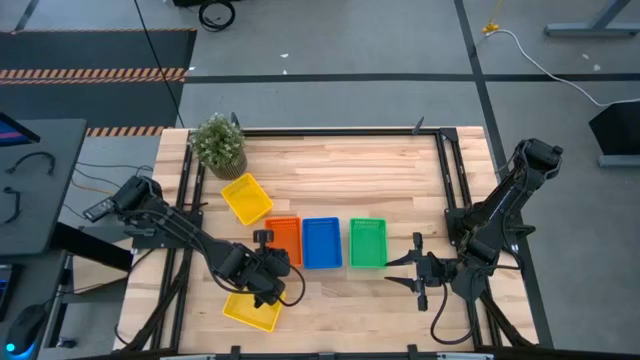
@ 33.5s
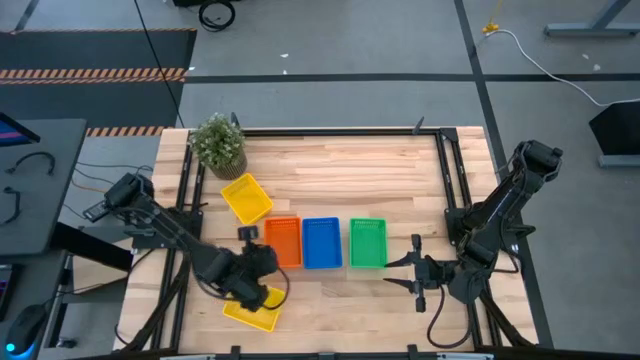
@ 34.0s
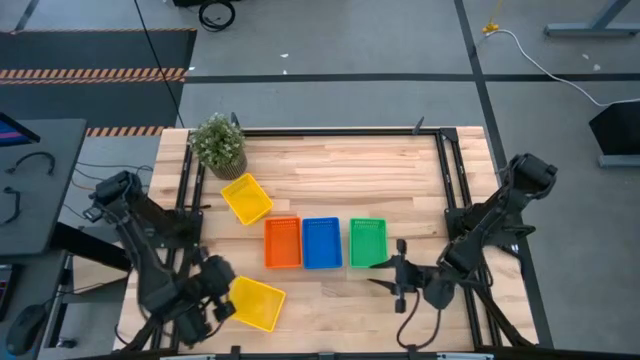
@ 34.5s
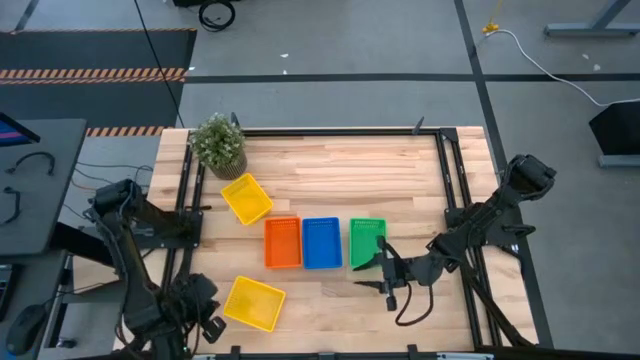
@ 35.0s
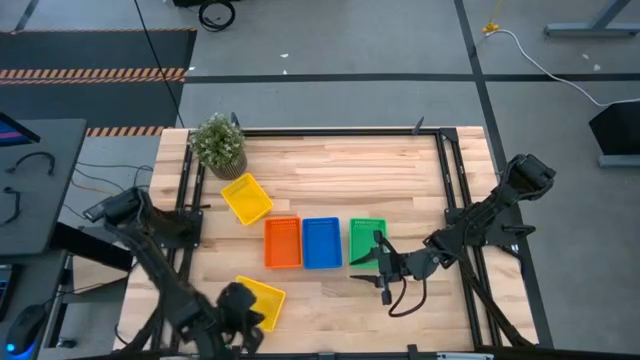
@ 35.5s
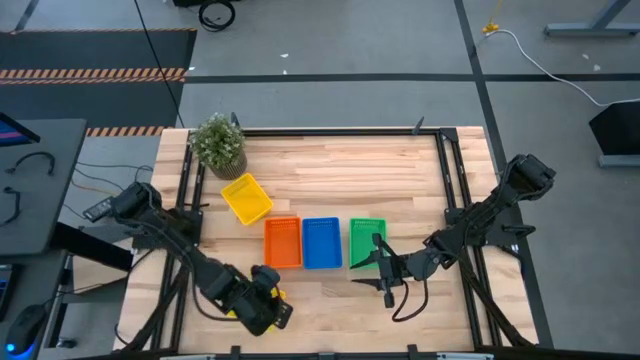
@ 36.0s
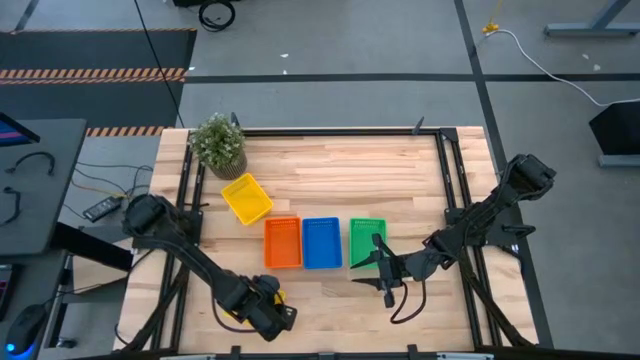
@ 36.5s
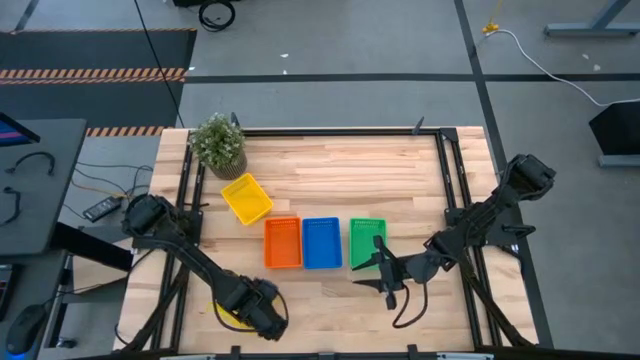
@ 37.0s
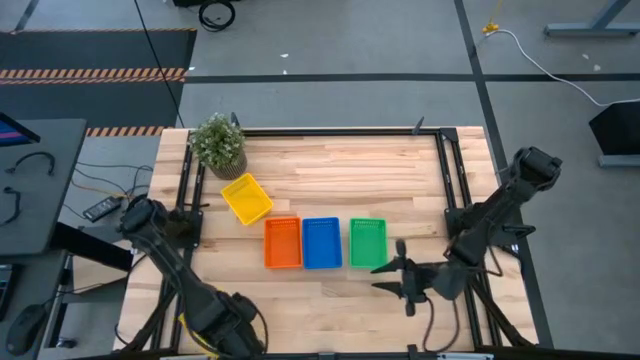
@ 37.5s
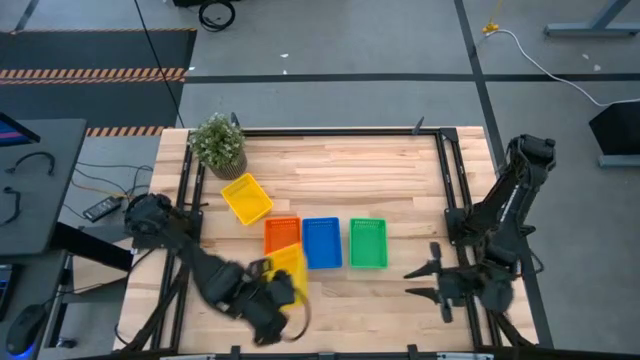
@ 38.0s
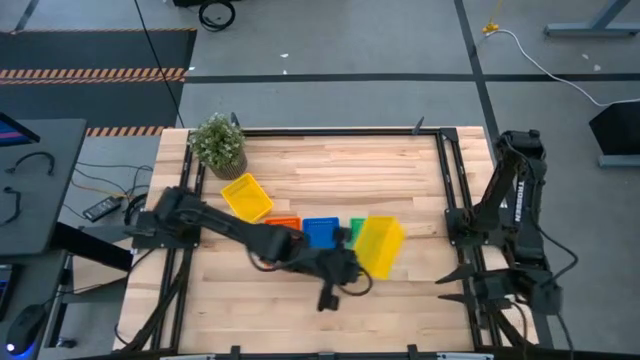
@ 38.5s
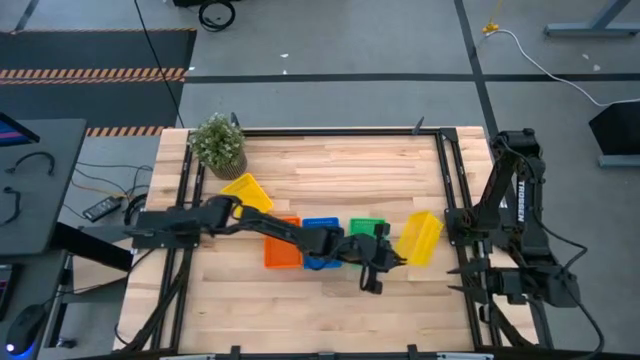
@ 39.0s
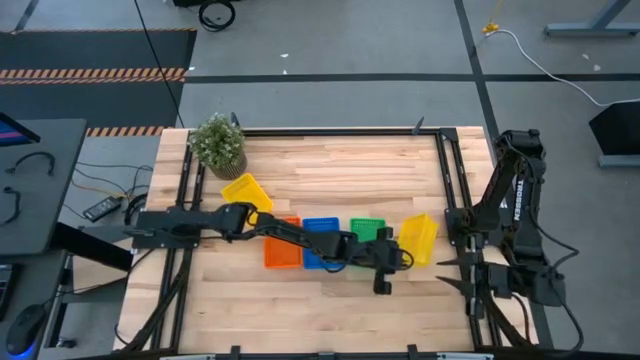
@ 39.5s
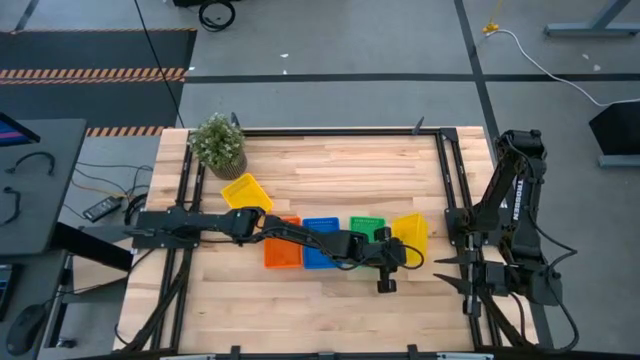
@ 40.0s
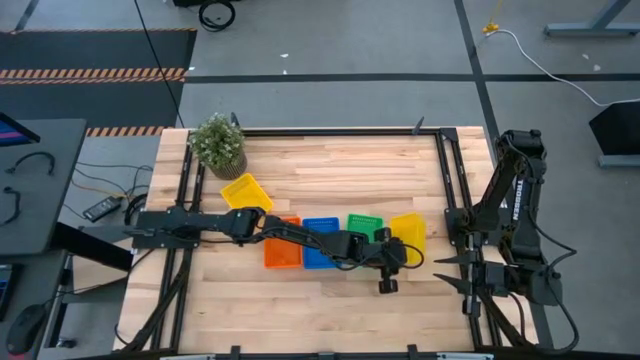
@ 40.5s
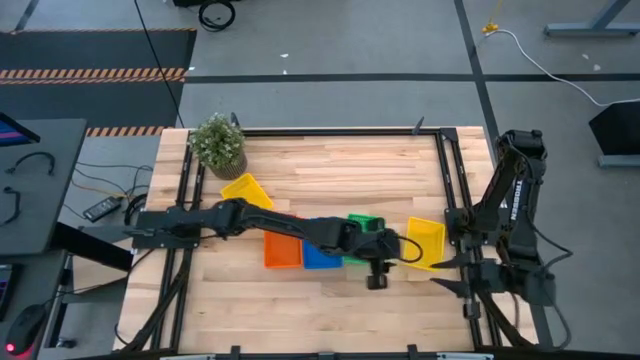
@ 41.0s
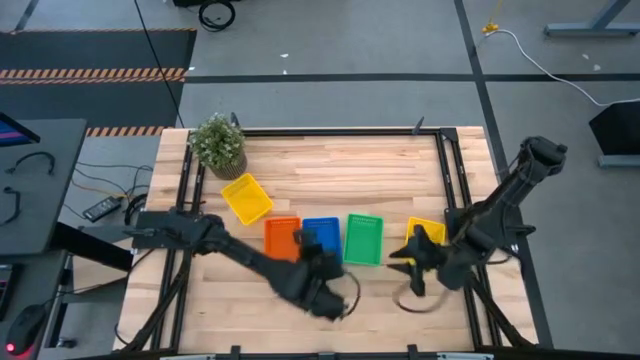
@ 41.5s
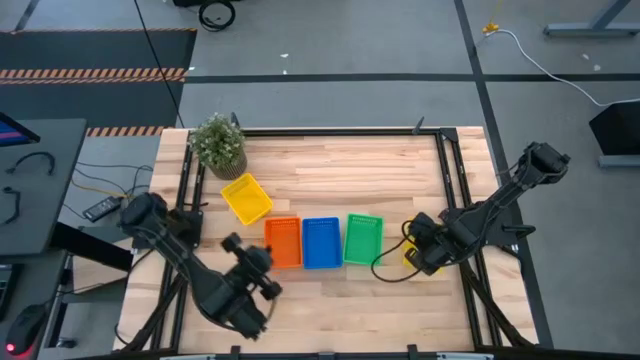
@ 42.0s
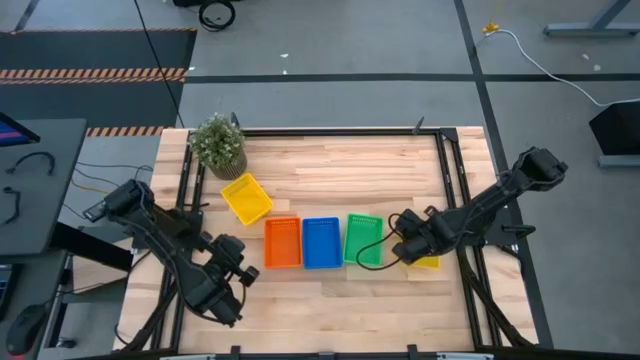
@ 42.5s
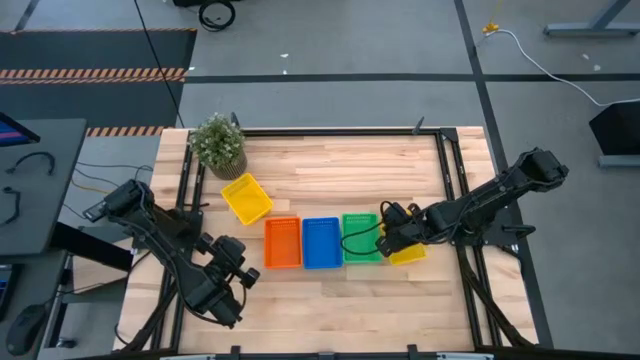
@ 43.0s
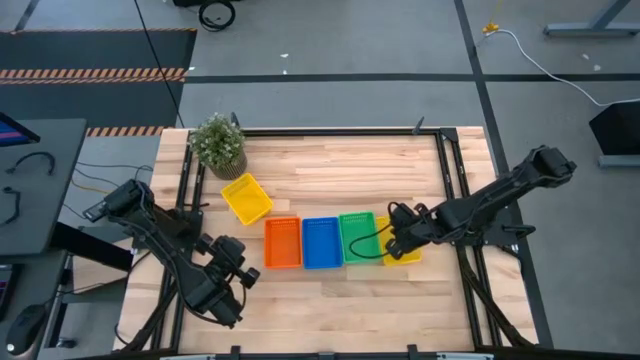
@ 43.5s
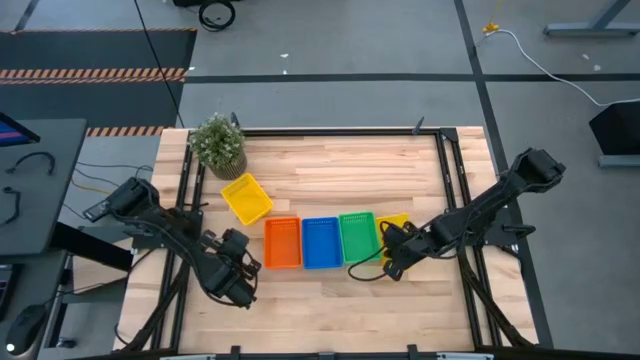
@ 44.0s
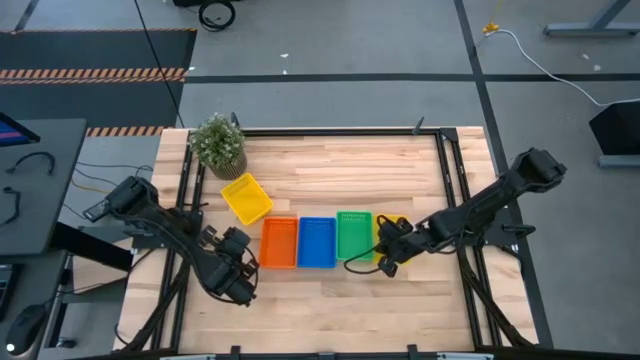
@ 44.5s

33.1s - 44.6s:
Move the bottom yellow bin to the right of the green bin

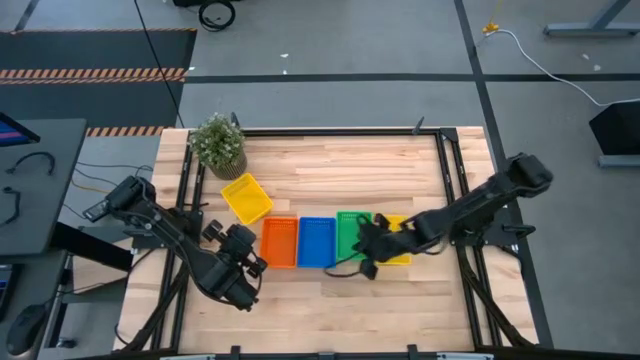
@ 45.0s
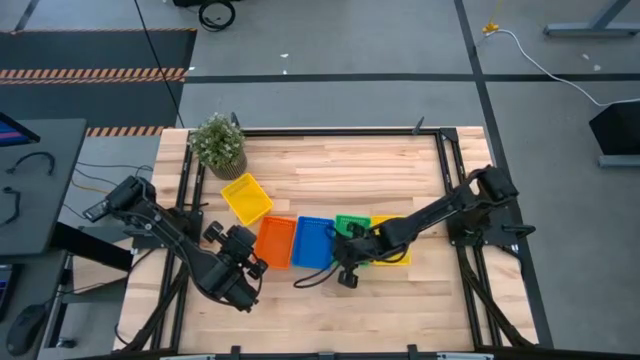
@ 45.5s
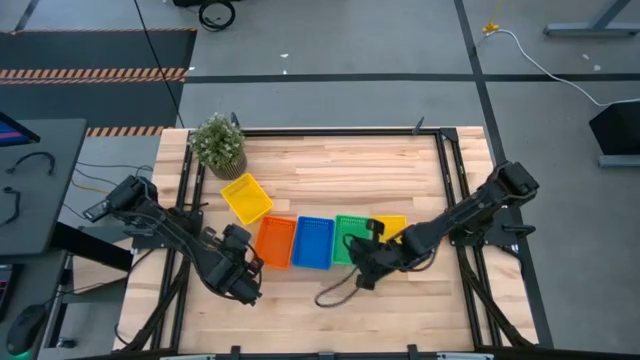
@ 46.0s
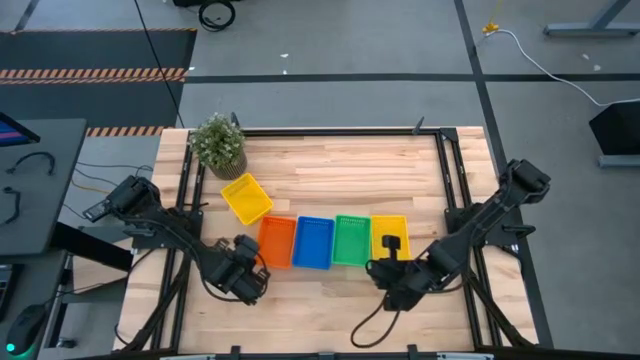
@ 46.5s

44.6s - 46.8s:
Adjust the bins

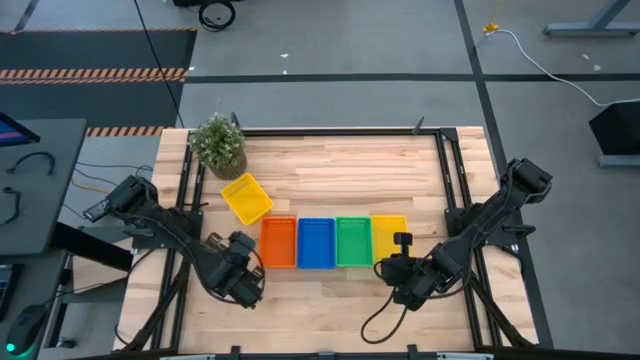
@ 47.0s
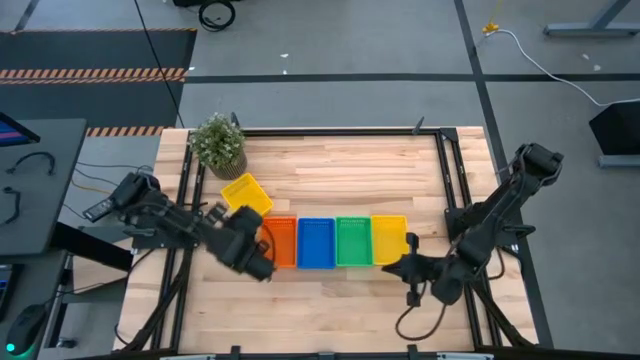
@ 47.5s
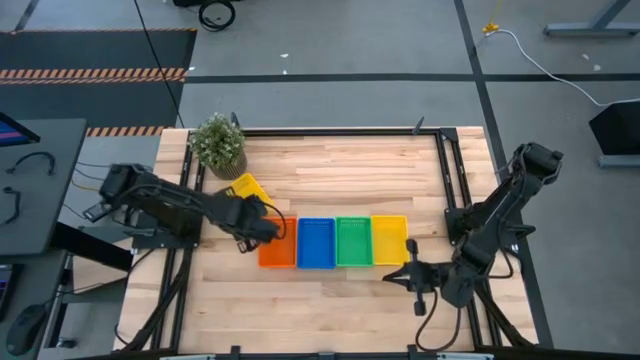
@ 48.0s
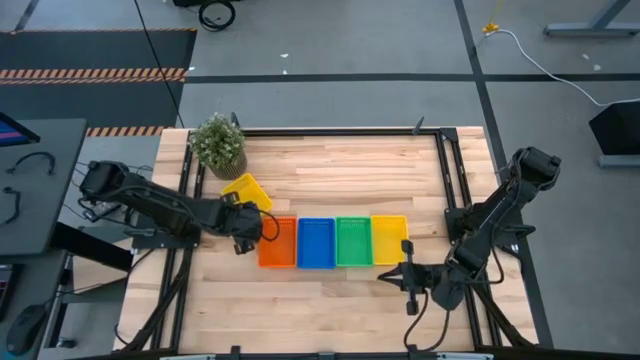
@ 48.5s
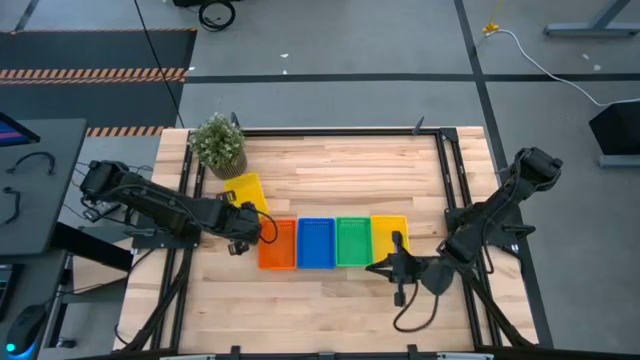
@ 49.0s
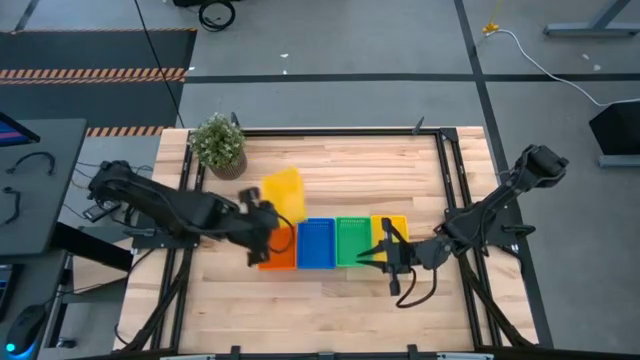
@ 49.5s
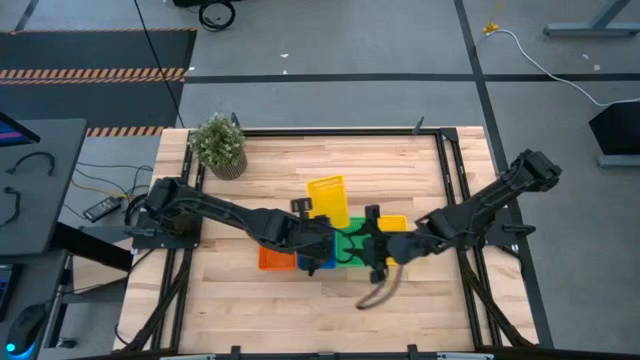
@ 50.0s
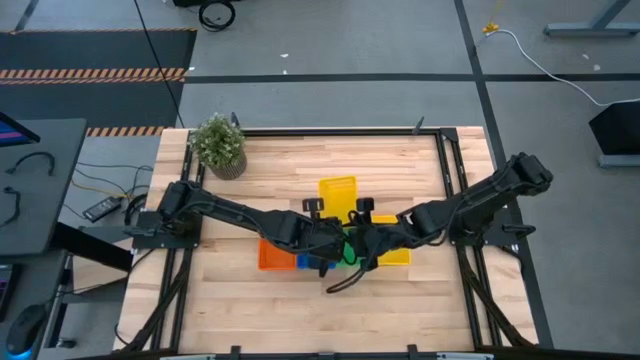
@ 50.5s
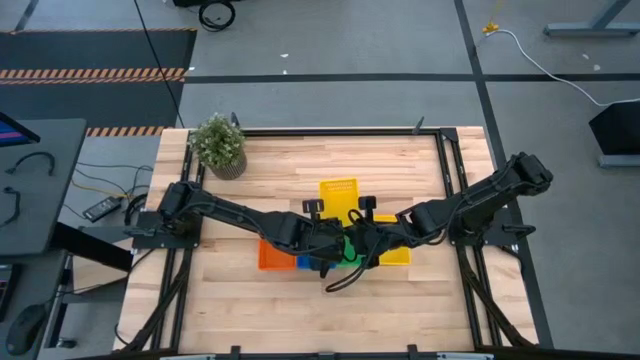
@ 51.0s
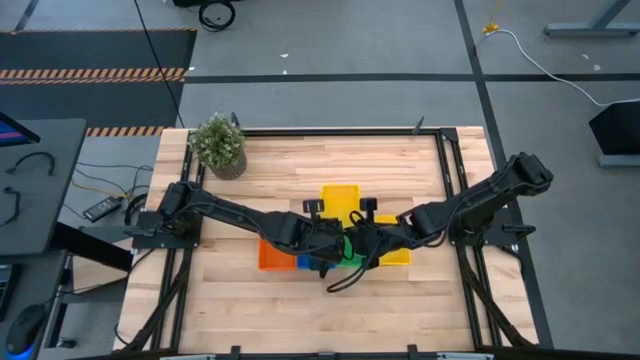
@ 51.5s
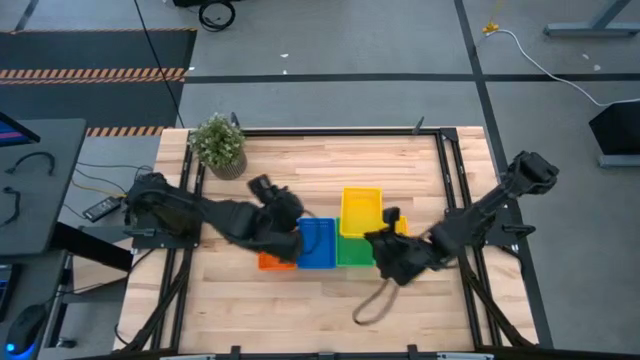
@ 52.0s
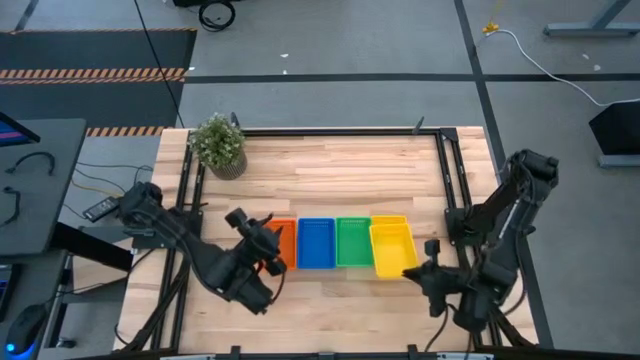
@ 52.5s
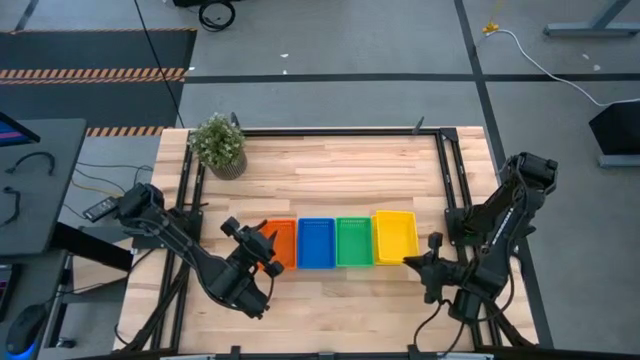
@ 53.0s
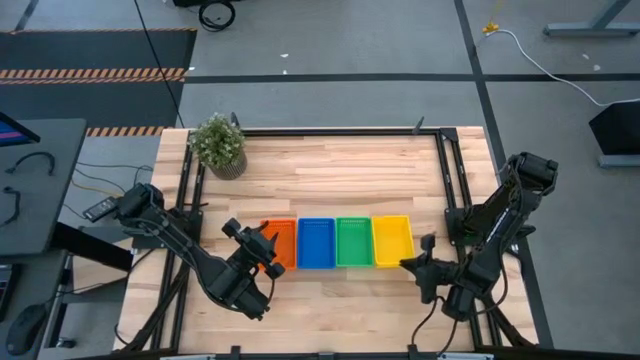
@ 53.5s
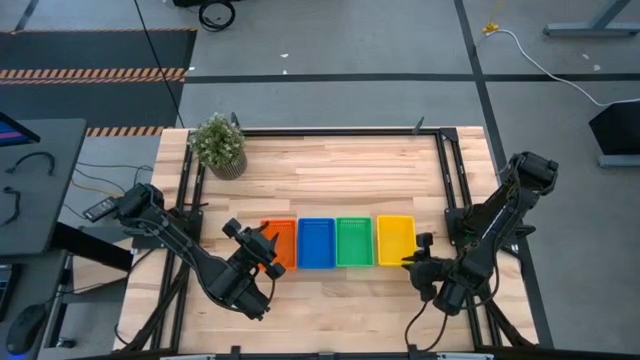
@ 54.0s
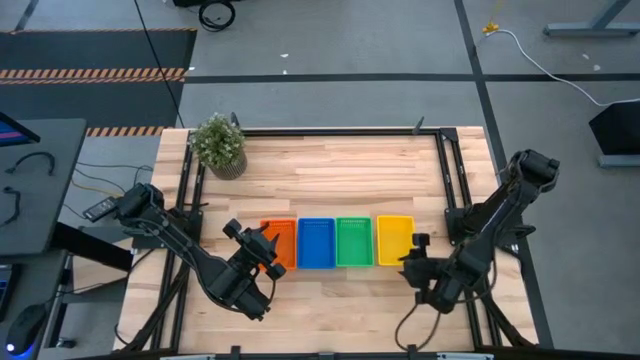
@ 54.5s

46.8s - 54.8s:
Stack the top yellow bin on top of the bottom yellow bin
